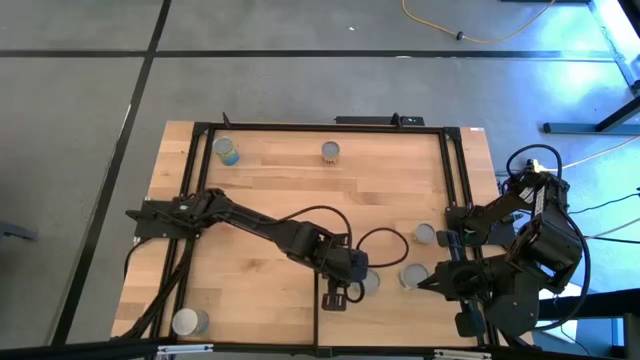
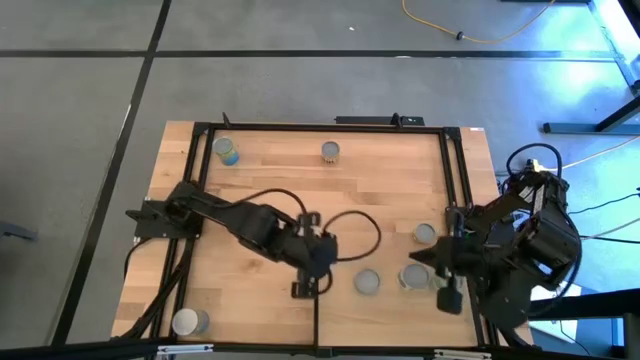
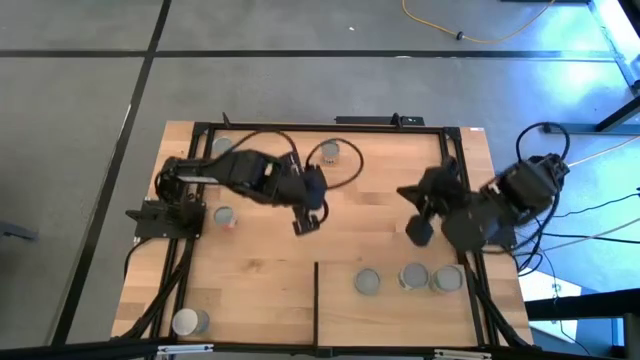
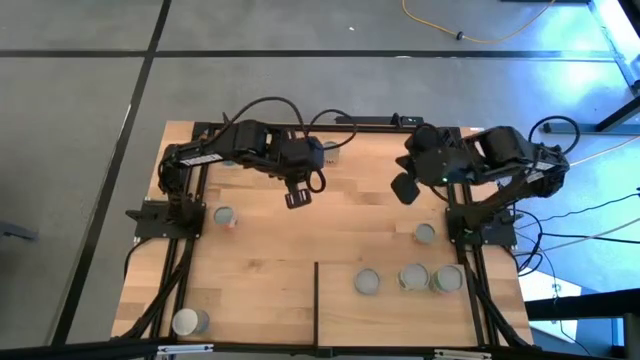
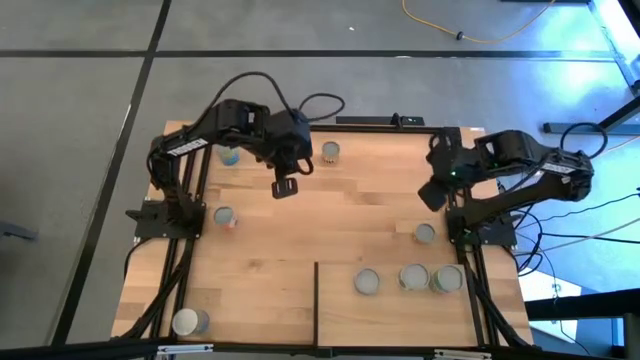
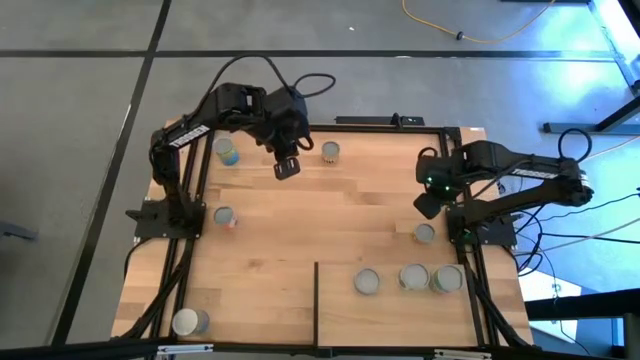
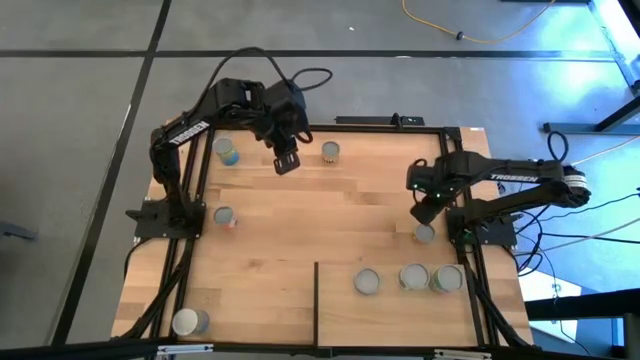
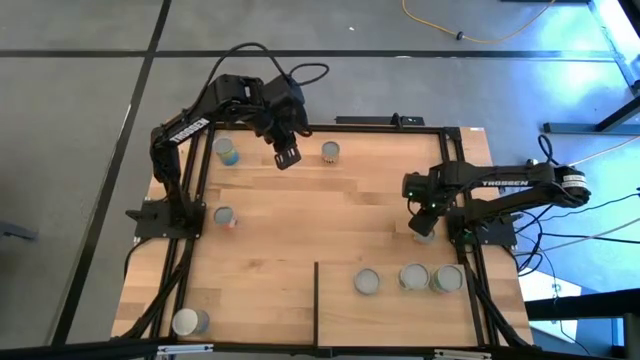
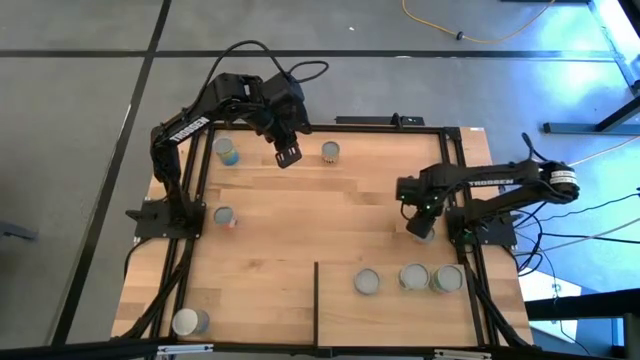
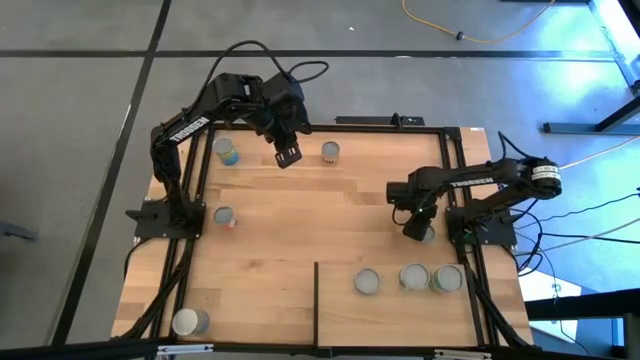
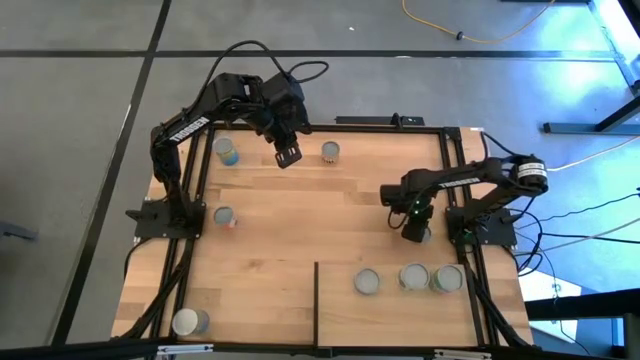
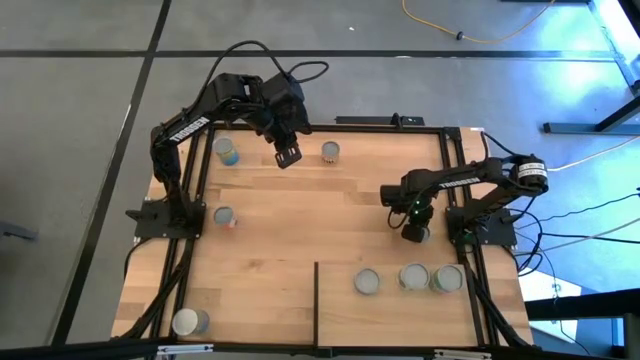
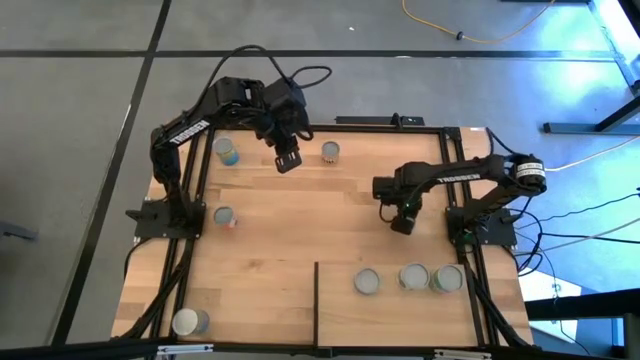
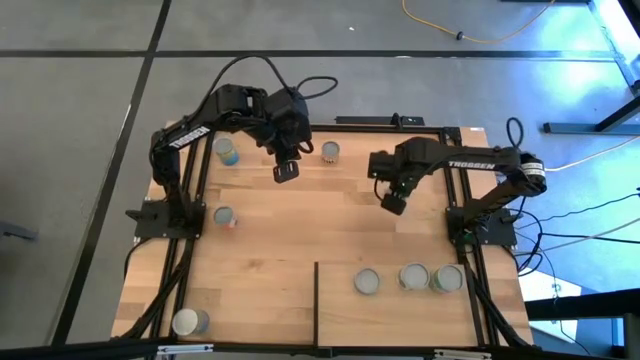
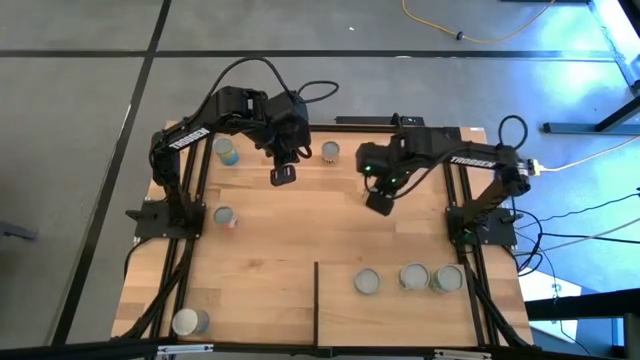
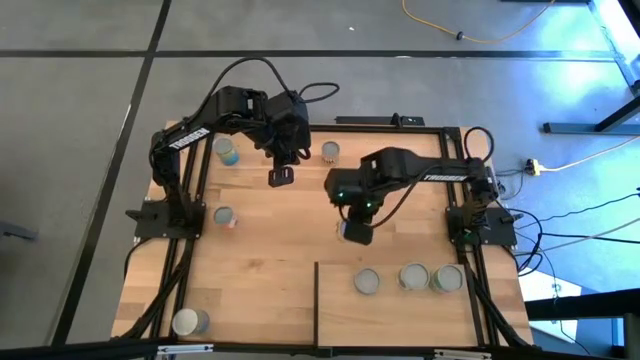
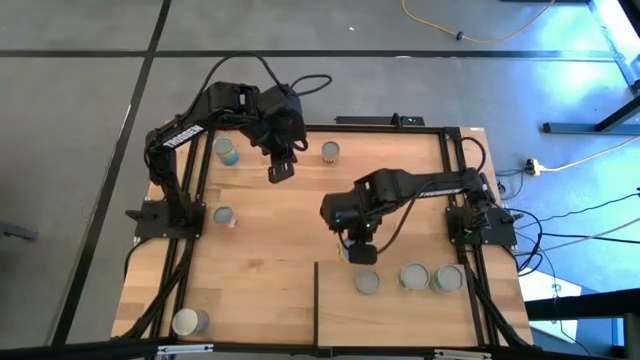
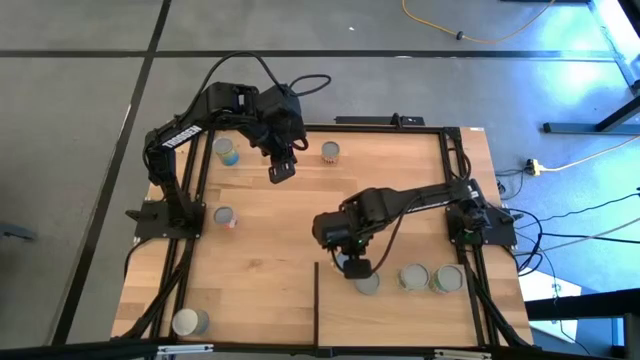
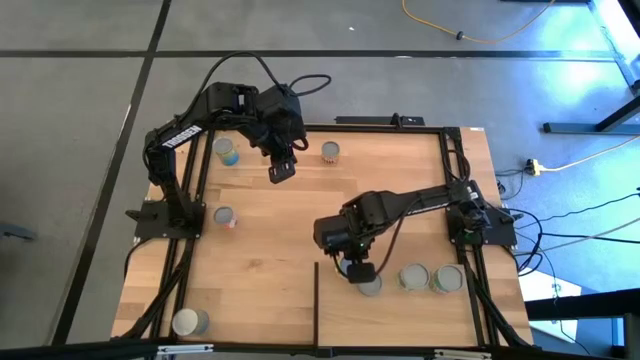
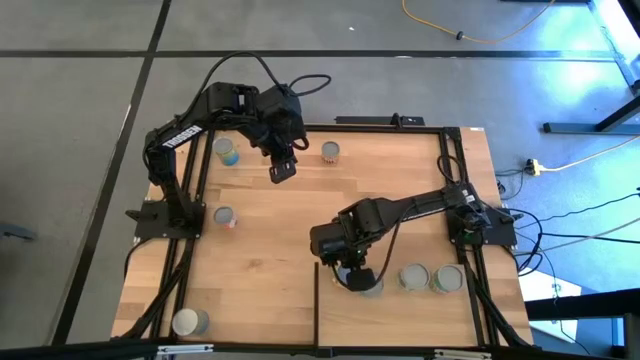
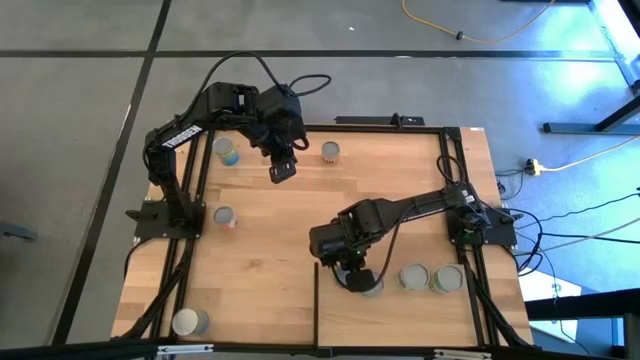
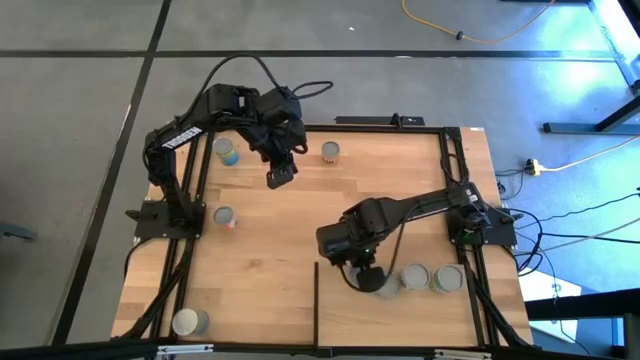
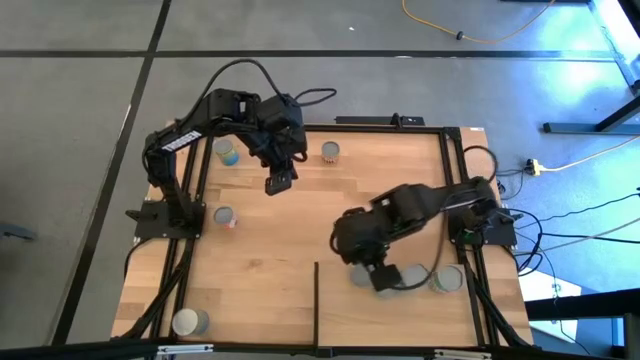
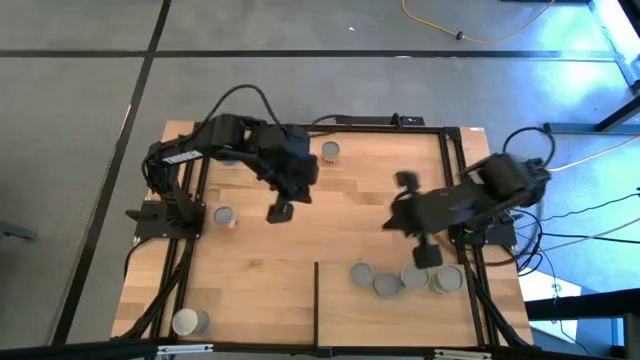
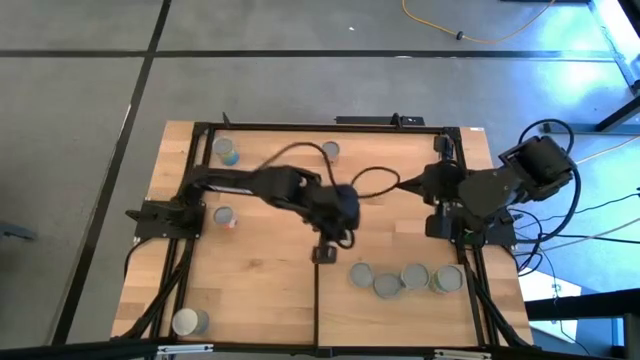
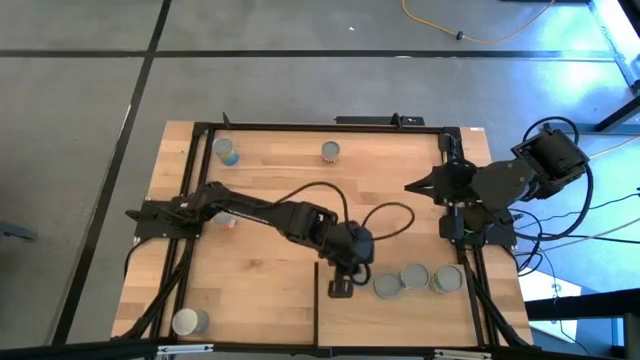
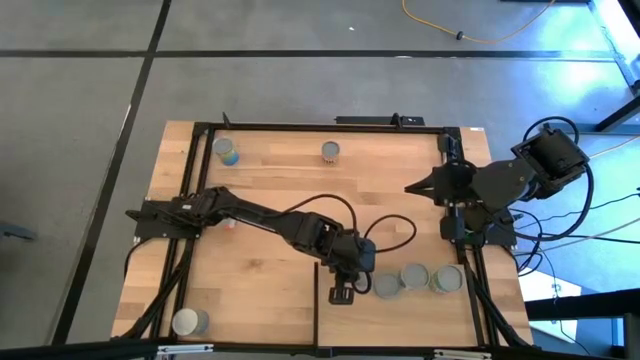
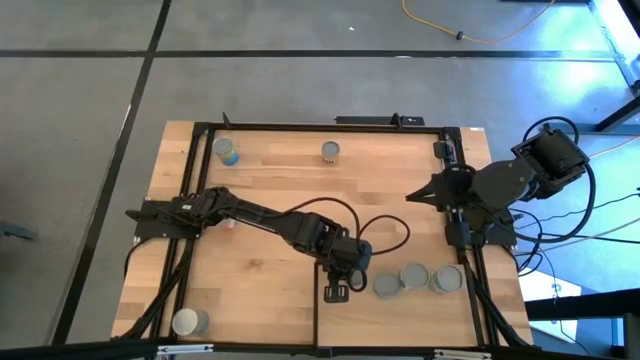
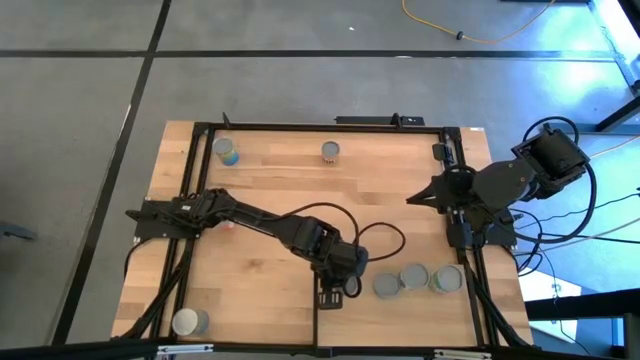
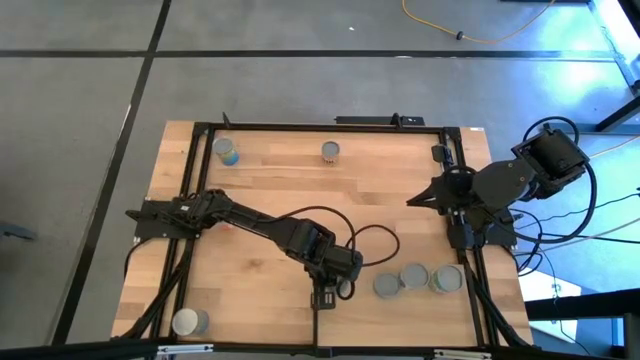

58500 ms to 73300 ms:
Task: Pick and place cans onto a shelf
Put the yellow canned mushroom on the shelf

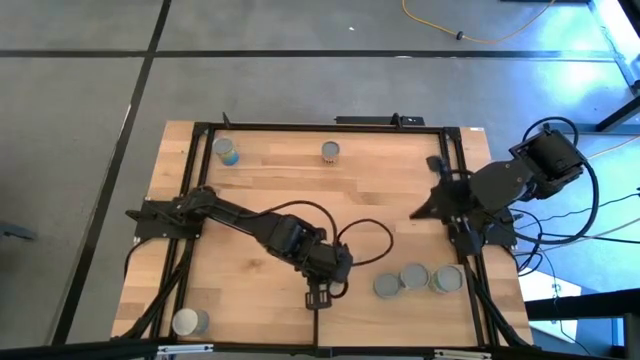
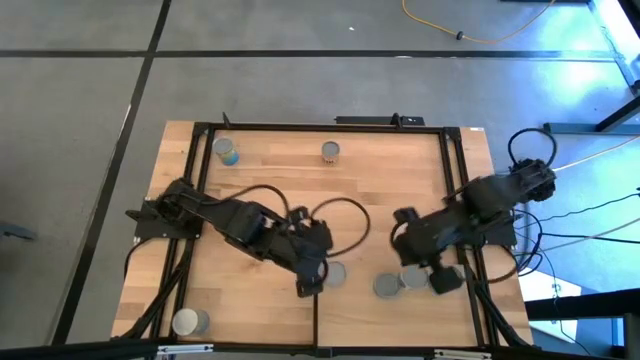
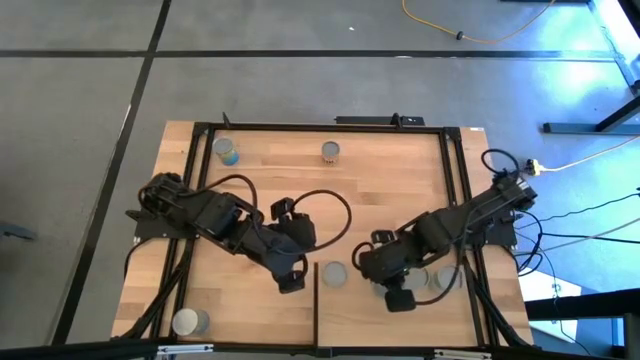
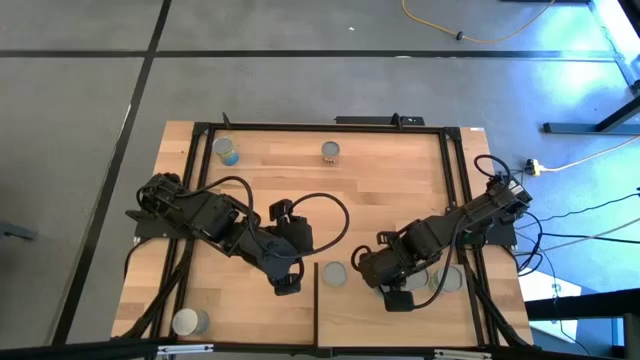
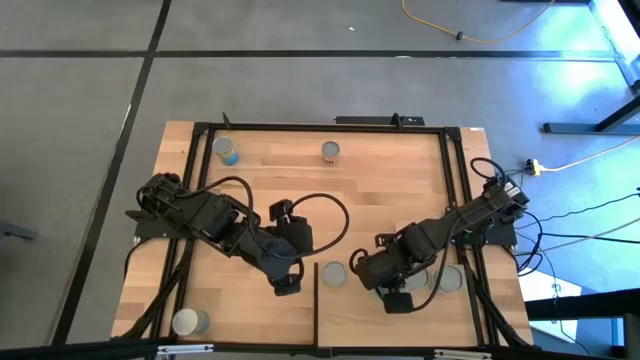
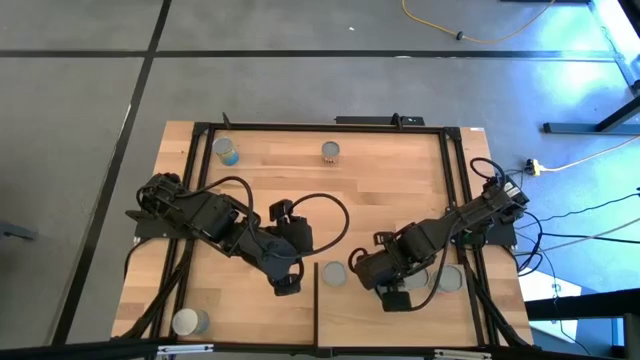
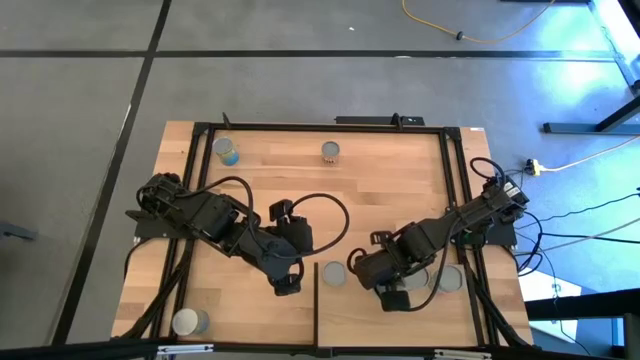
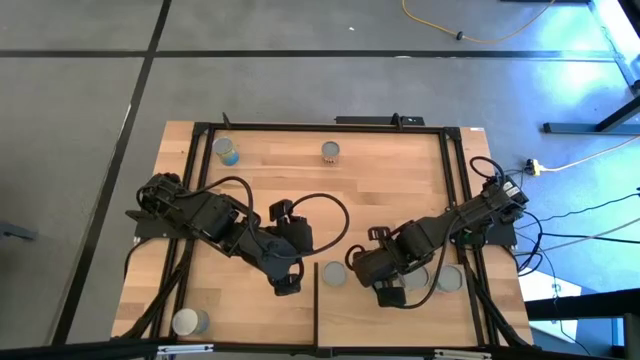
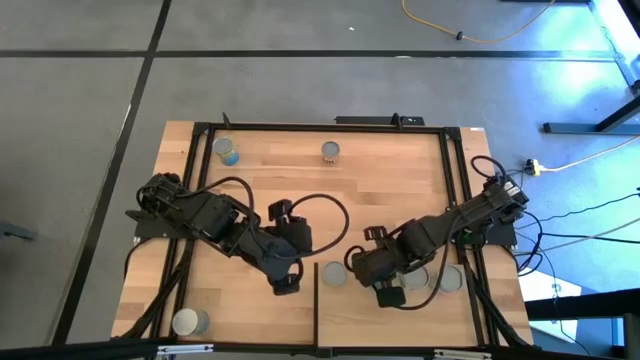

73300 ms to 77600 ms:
Adjust the green tuna can on the shelf

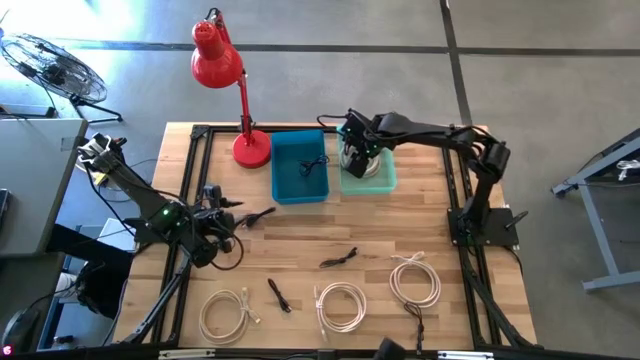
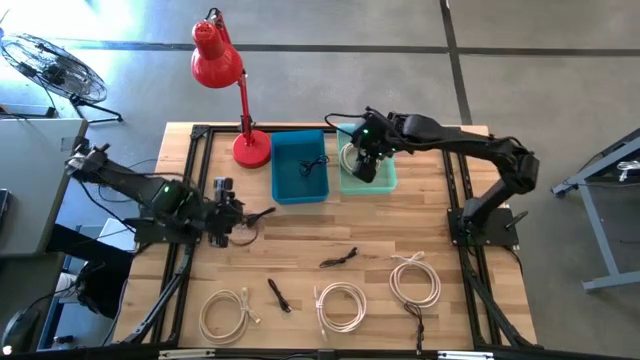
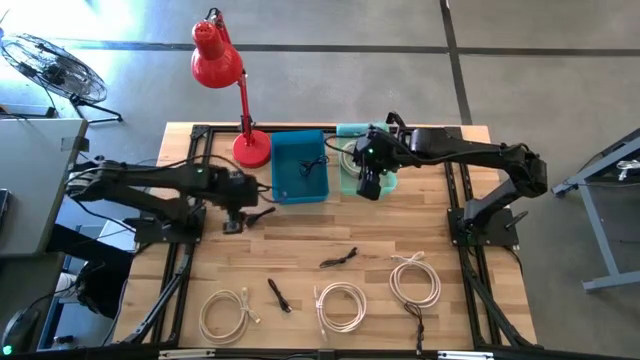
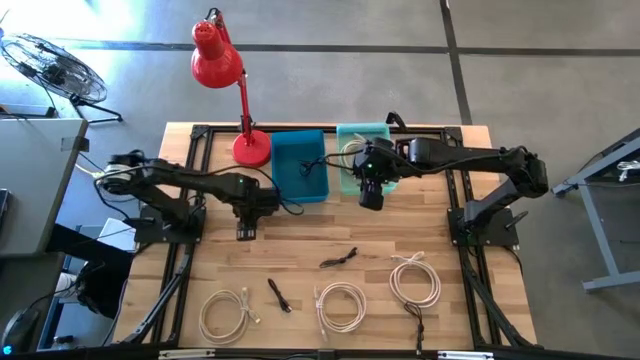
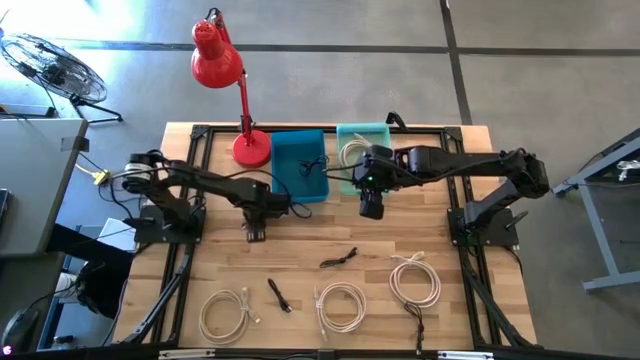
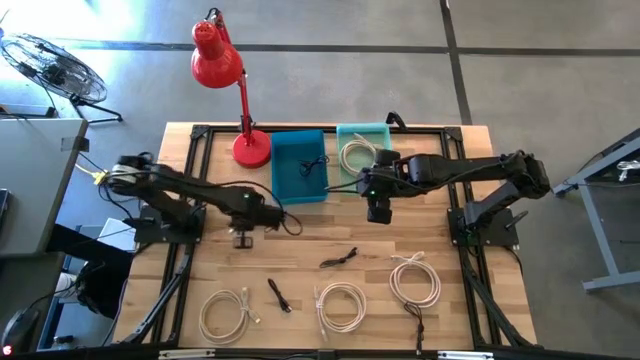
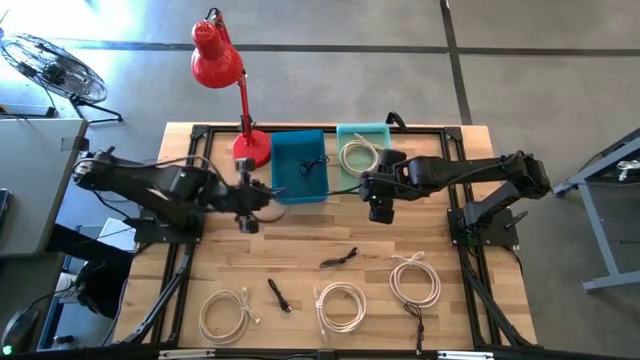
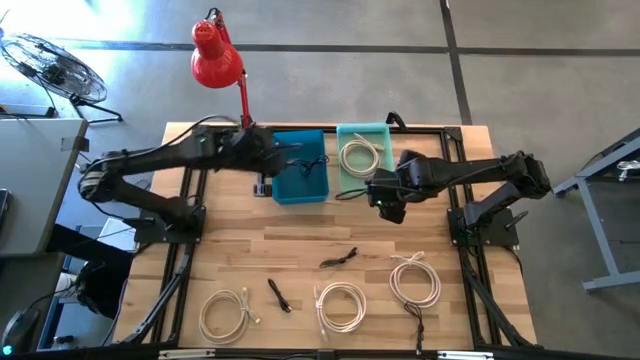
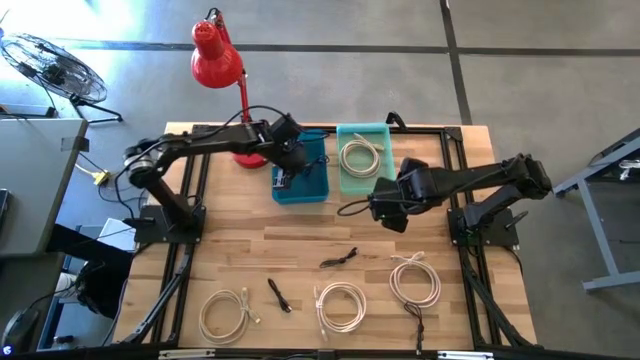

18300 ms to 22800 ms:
Task: Pick & Place USB Port
Put the black usb cable into the blue bin
